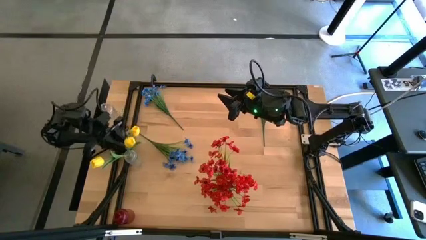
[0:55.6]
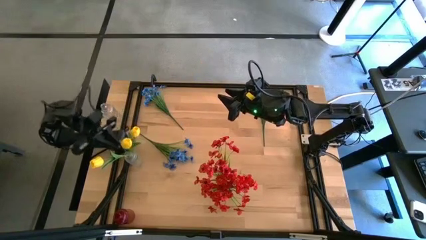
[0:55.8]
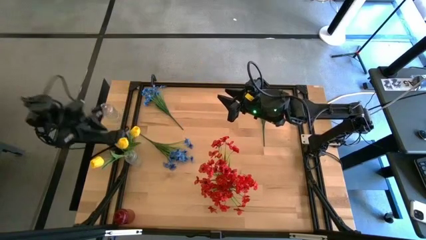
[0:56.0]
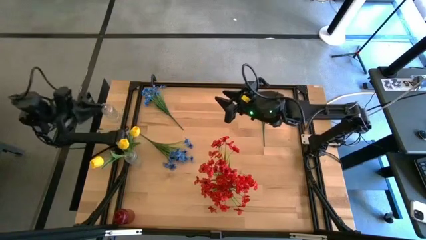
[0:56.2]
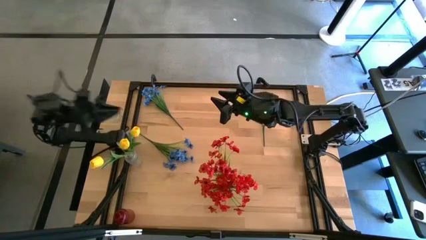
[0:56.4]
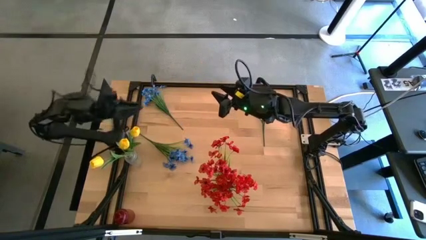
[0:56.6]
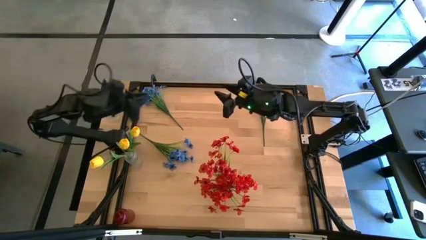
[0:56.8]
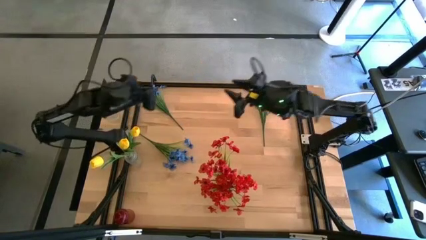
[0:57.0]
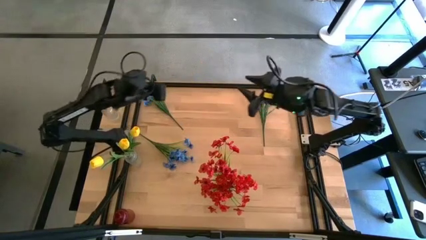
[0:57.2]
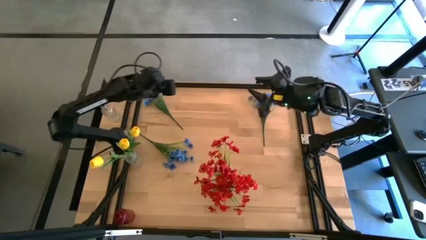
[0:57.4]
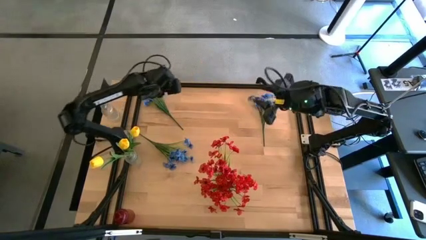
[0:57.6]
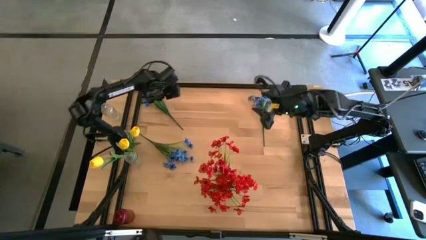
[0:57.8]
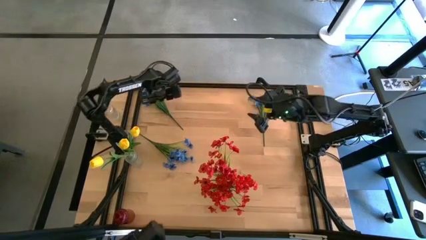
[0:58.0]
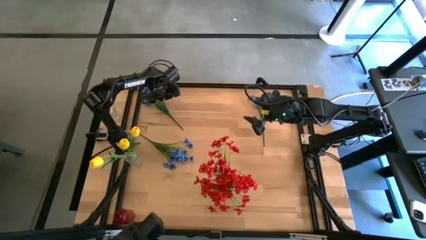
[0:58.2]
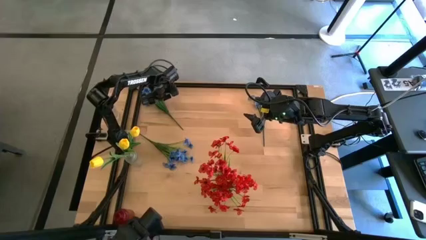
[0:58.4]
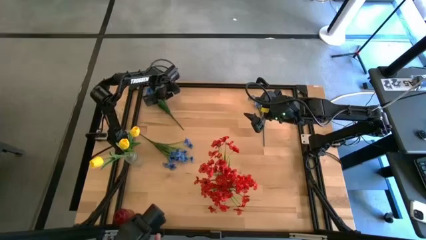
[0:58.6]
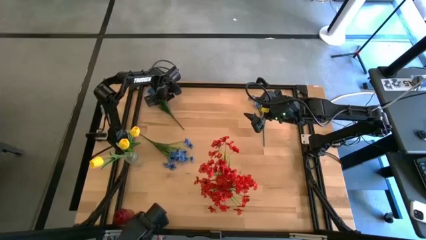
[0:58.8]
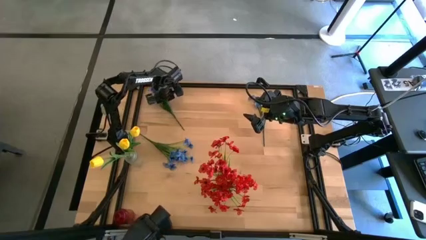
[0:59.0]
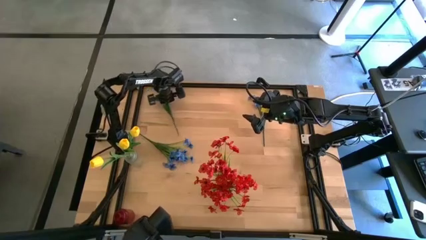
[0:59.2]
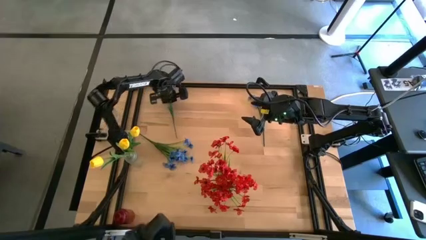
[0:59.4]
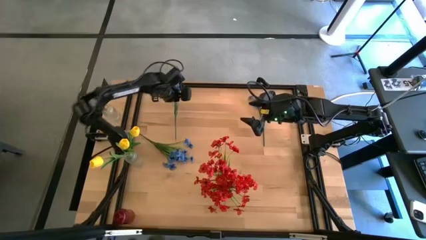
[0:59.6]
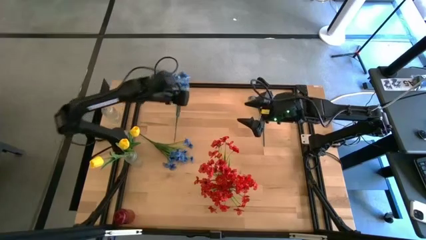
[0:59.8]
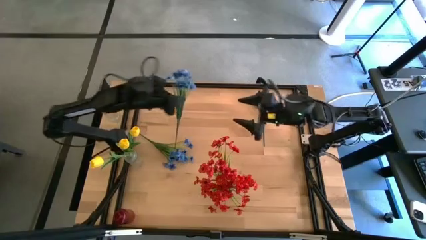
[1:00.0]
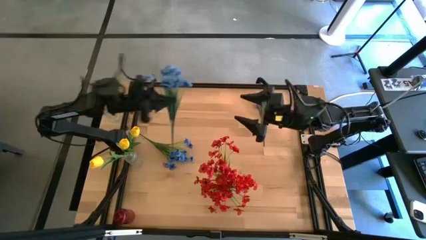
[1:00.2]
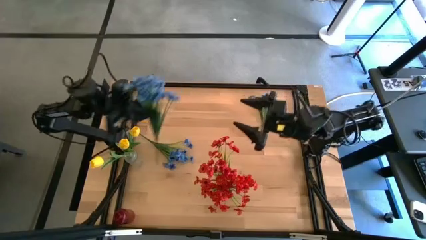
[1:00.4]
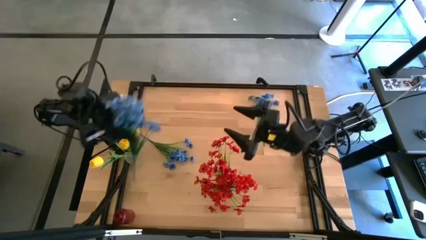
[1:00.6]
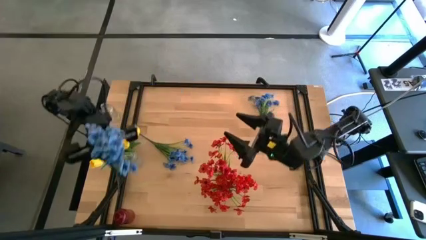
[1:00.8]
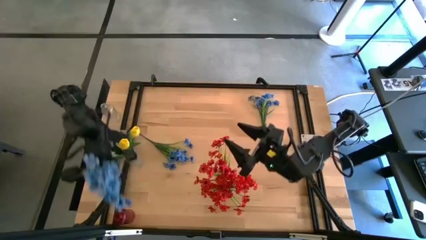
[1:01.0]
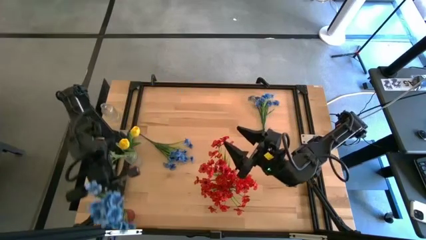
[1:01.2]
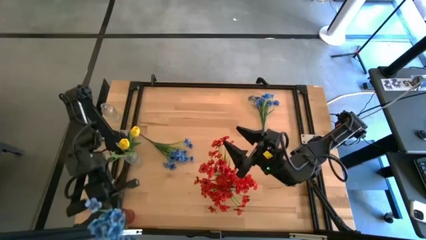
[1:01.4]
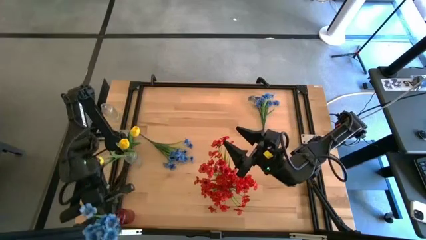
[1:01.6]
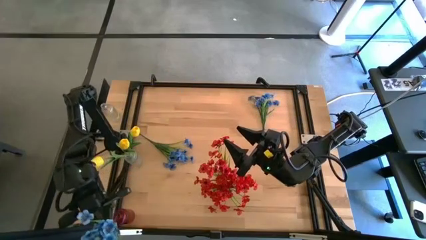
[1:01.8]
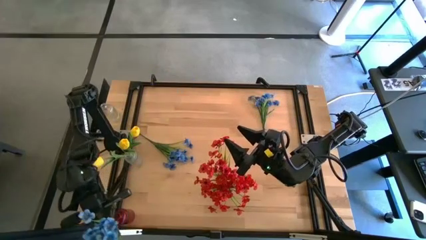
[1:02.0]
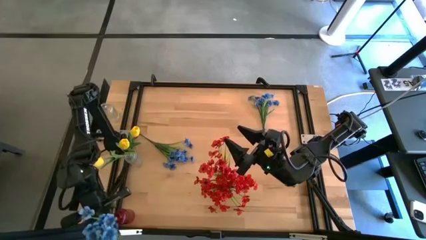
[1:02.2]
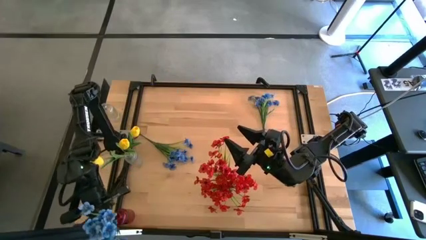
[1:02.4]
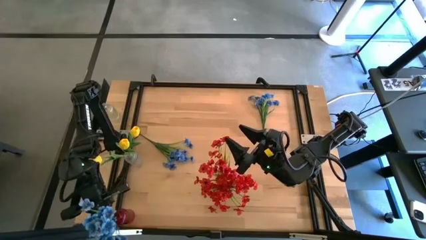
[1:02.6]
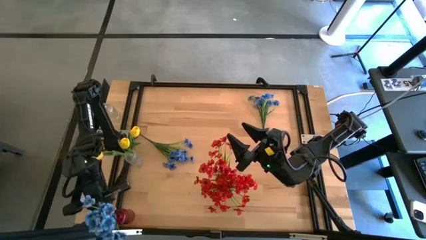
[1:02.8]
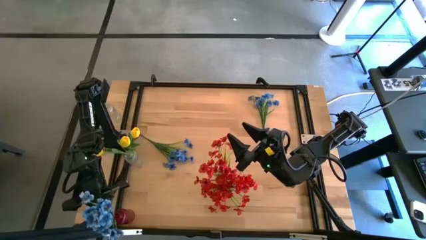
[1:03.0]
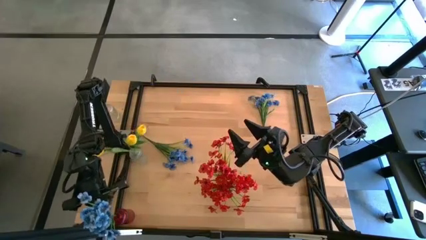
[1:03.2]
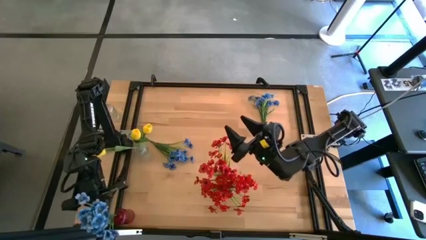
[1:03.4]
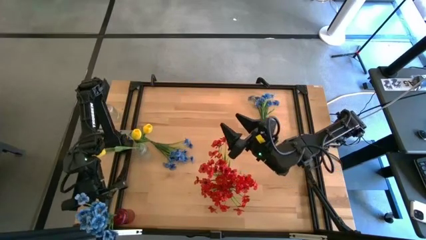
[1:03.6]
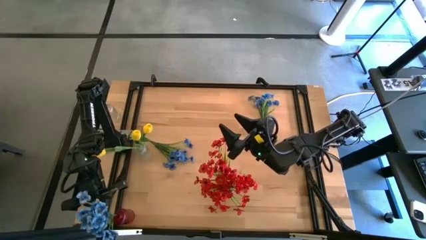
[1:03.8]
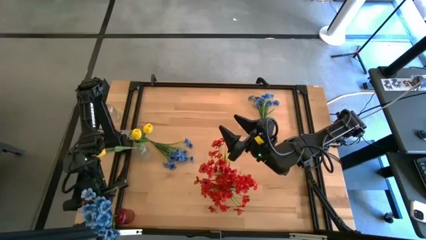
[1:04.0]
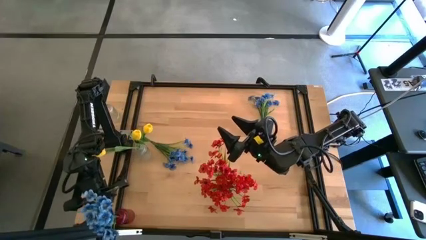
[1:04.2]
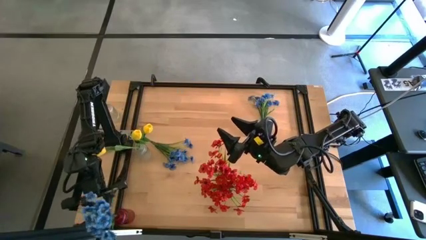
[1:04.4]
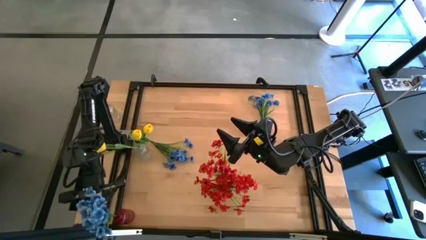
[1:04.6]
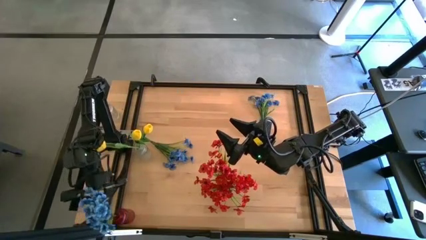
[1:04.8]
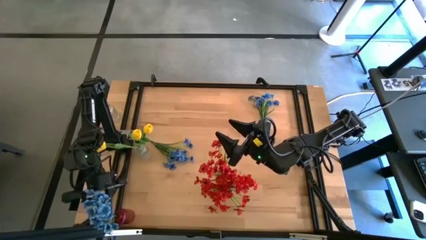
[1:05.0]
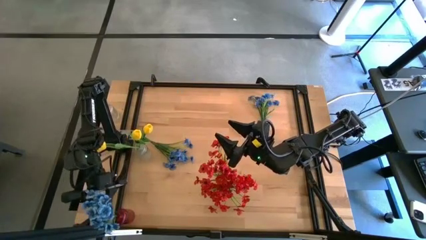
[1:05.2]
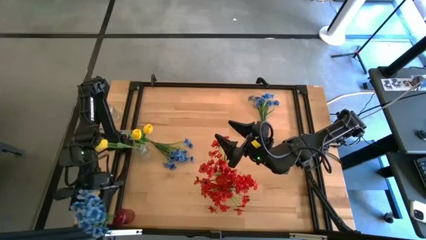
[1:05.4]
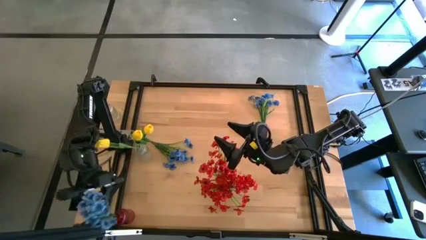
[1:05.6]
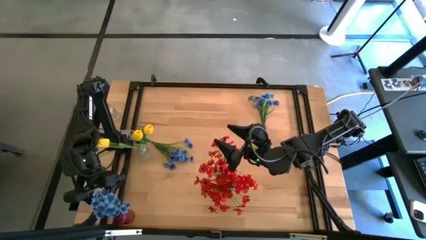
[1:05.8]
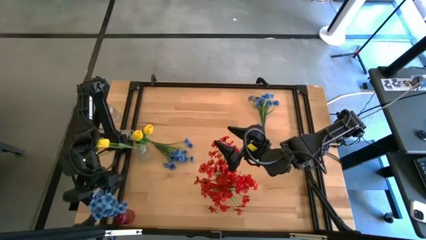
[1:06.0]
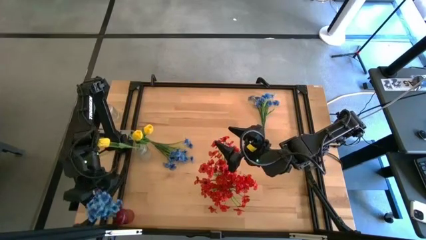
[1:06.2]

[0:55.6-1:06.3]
Task: Sort flowers into vase by color
Put the top left blue flowers into the red vase

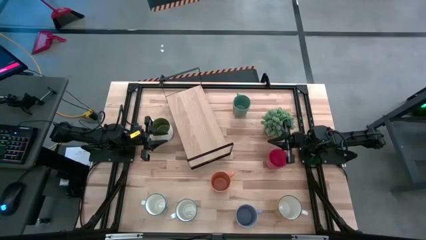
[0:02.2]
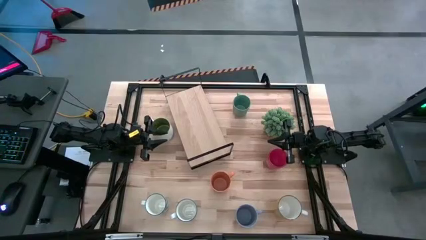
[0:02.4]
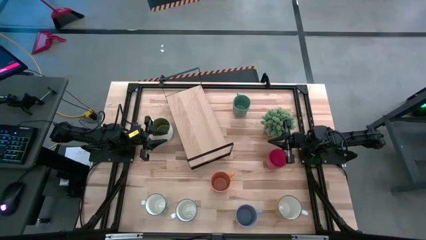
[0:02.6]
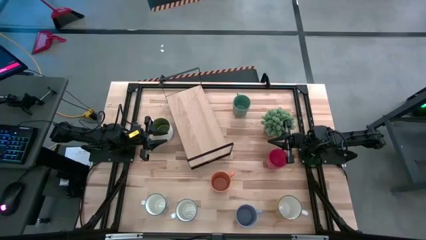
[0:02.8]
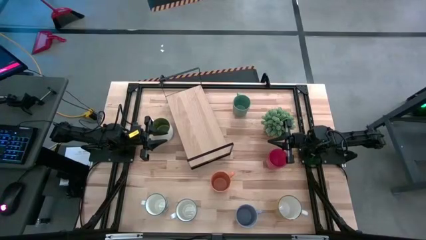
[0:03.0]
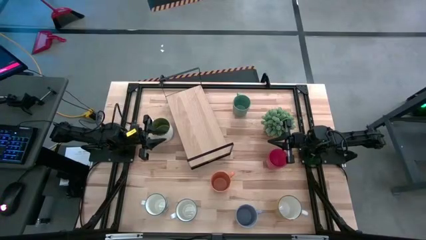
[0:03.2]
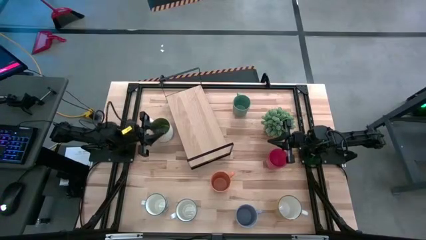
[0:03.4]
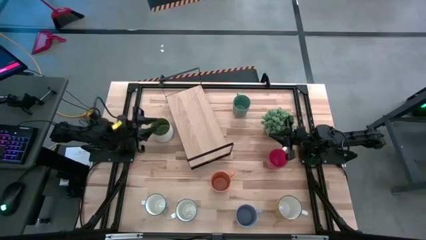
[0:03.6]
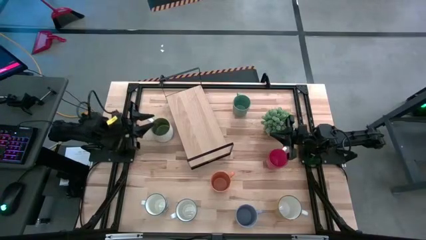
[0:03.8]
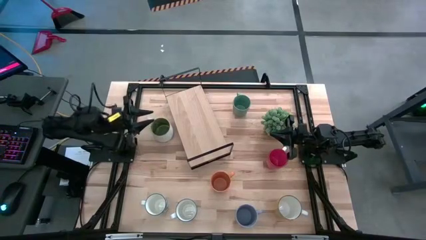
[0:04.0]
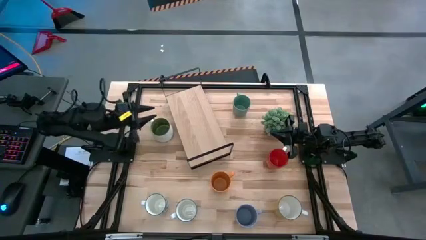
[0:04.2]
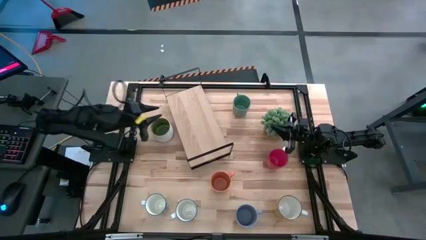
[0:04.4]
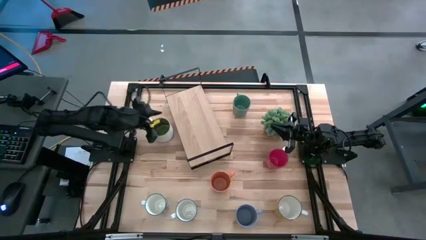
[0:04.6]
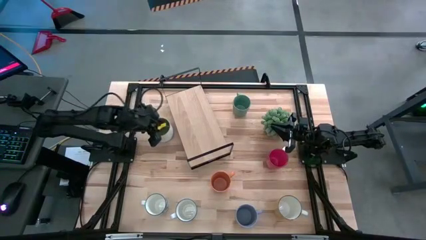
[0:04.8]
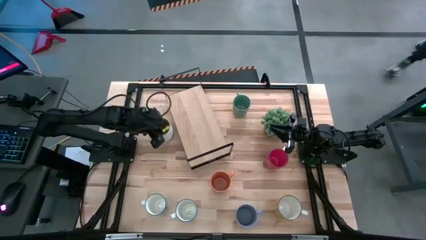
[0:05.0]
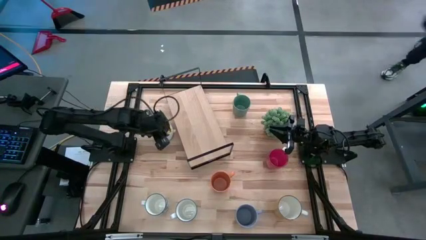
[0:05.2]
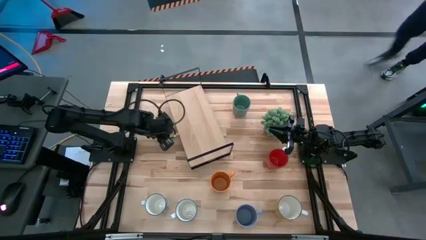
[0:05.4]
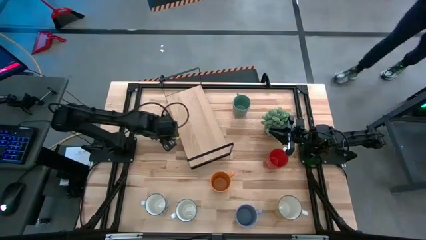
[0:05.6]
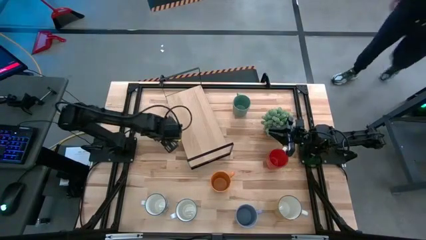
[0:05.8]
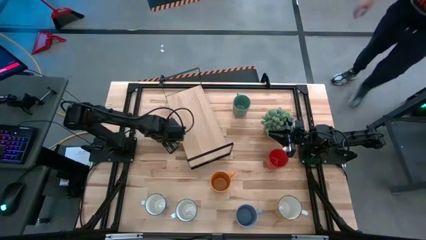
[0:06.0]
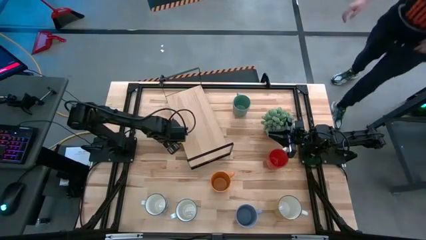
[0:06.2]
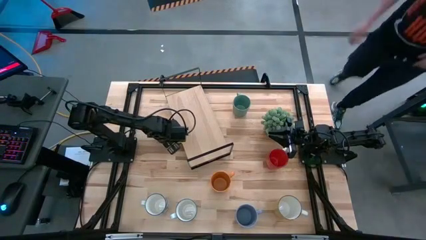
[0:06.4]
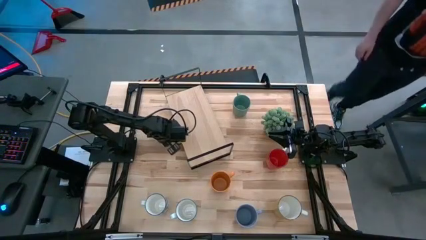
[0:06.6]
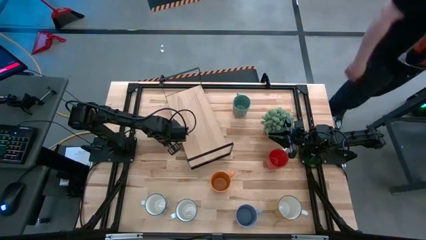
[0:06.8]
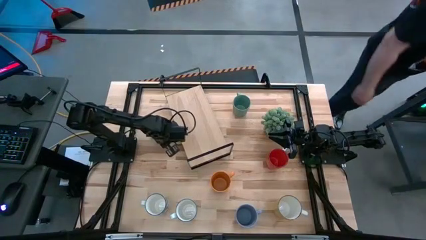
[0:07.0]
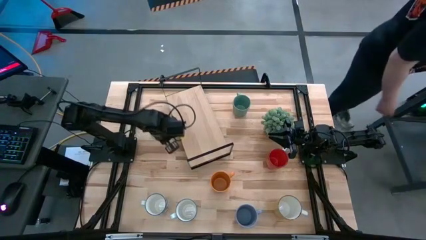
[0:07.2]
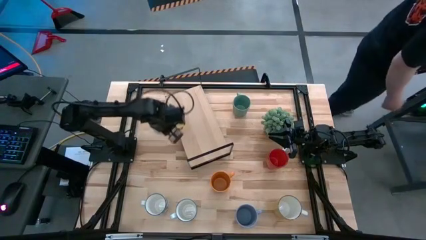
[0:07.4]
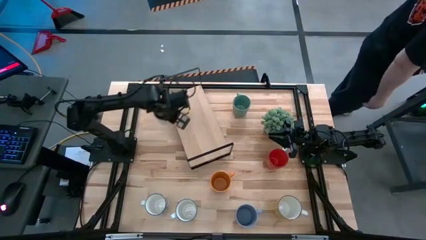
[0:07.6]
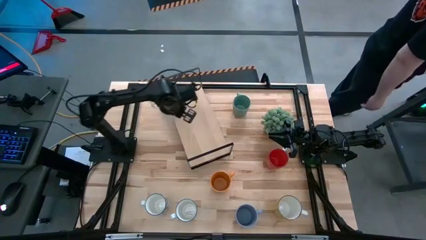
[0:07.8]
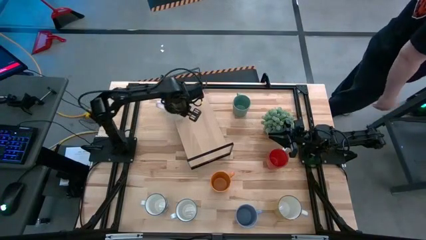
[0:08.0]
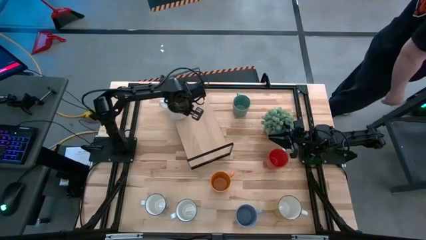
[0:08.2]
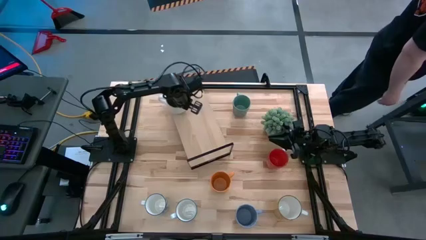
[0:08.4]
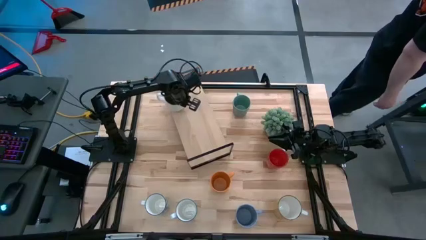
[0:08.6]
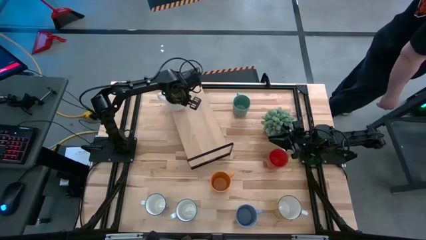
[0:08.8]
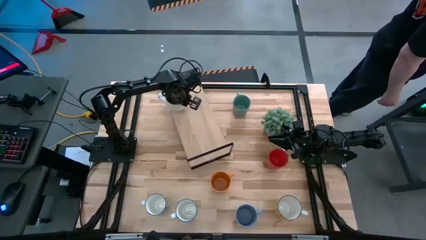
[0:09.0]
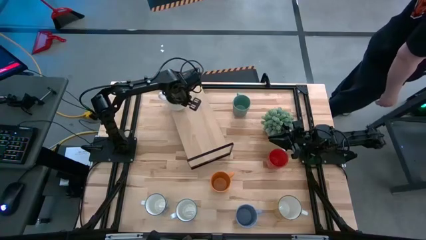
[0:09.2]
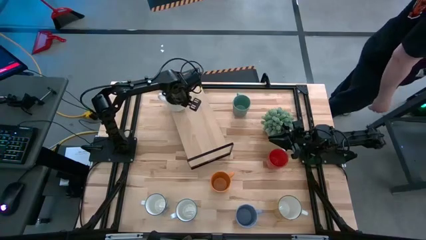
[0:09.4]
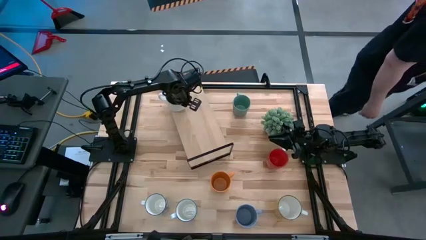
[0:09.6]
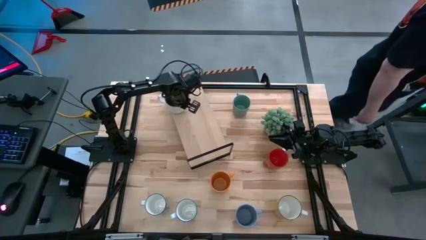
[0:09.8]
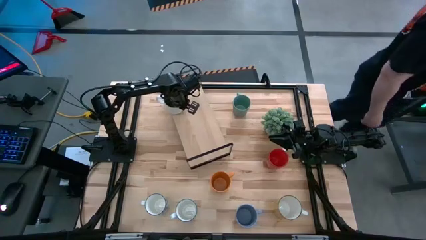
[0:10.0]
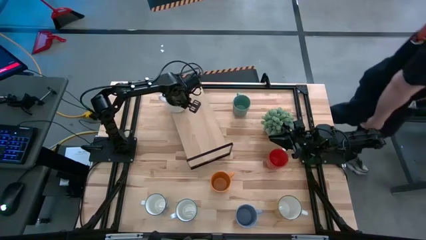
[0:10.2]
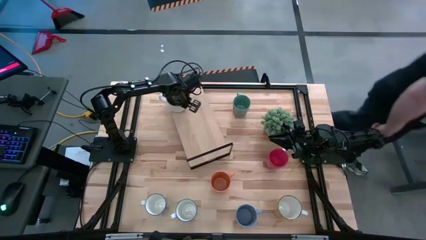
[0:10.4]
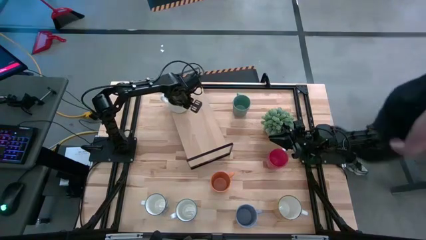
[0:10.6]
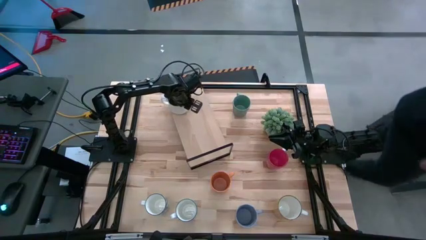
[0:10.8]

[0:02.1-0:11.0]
Task: Place coffee mugs
Put the white green mug on the shelf
